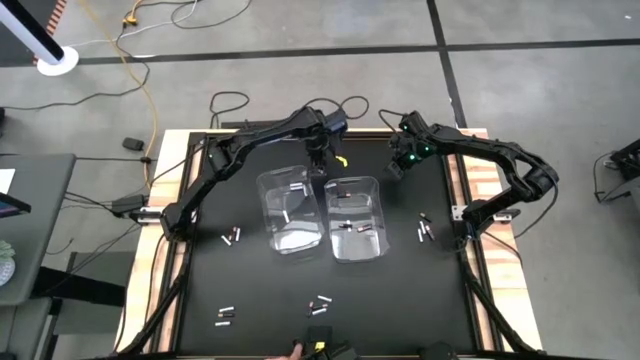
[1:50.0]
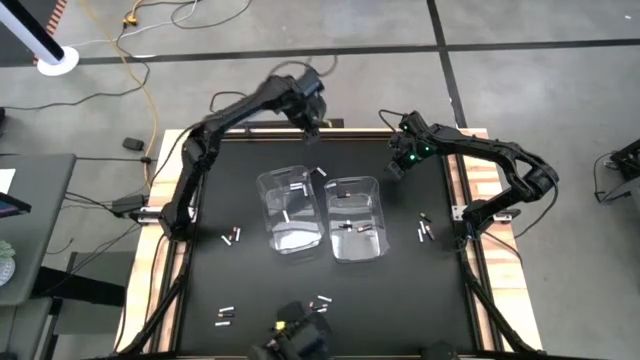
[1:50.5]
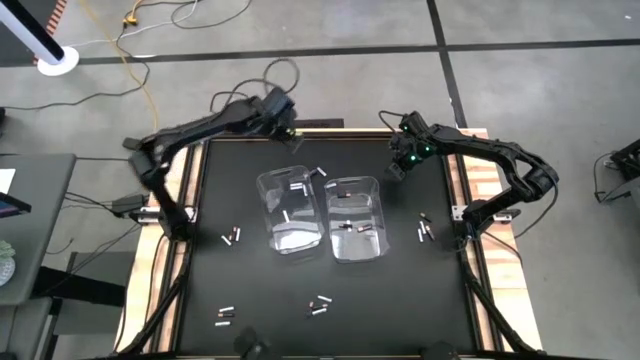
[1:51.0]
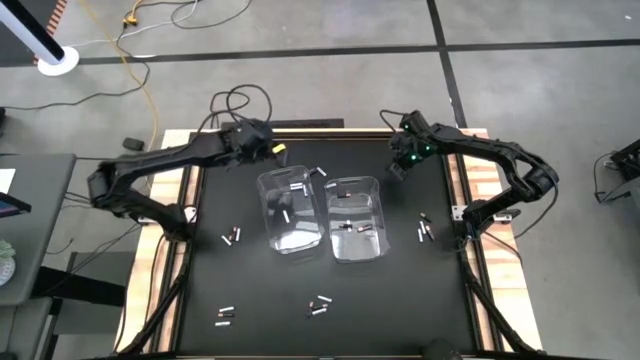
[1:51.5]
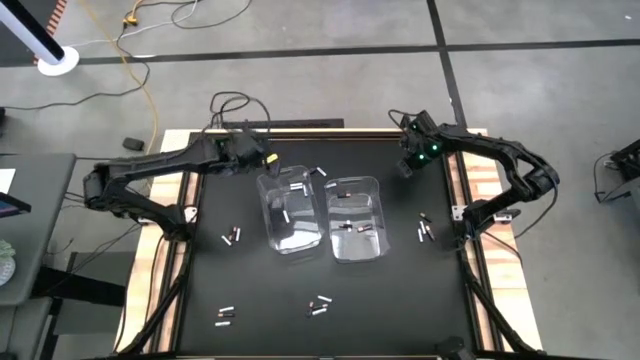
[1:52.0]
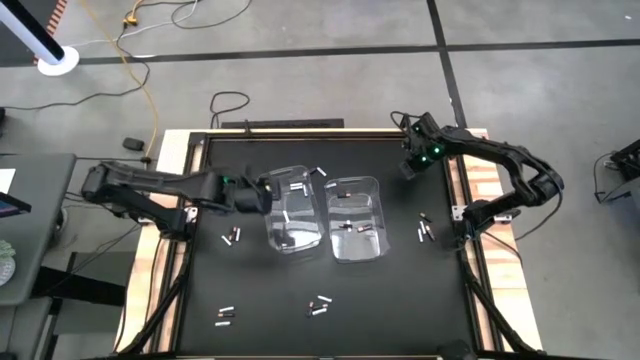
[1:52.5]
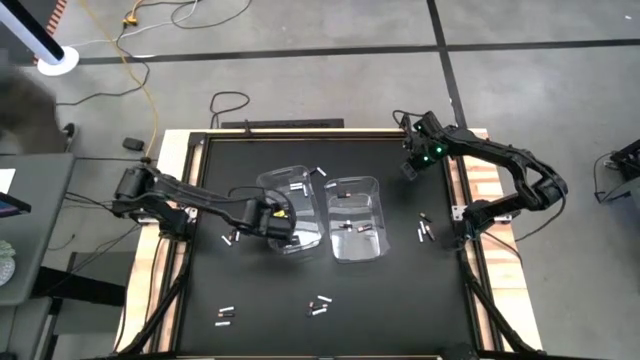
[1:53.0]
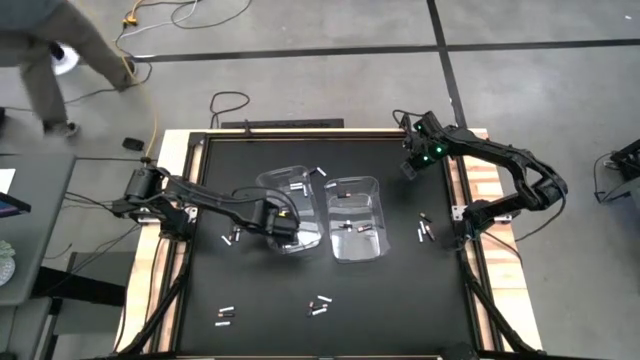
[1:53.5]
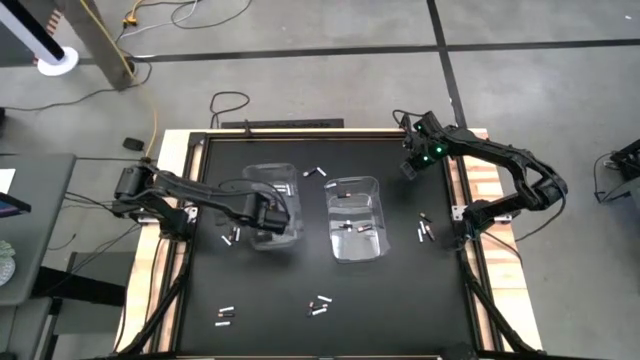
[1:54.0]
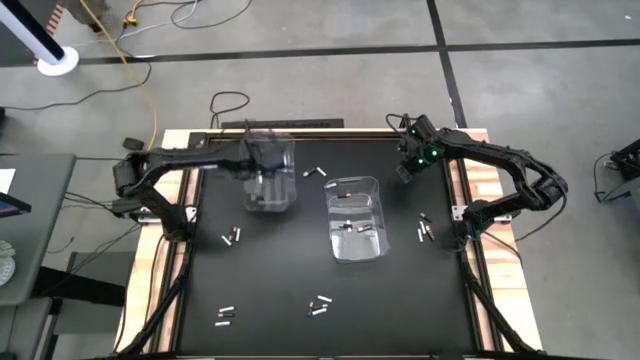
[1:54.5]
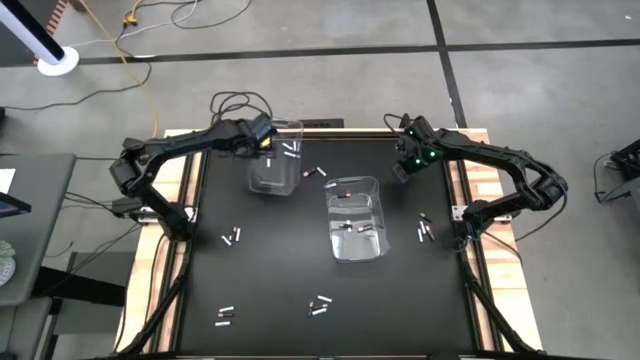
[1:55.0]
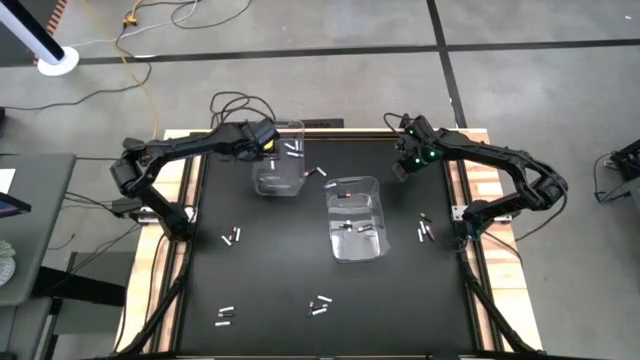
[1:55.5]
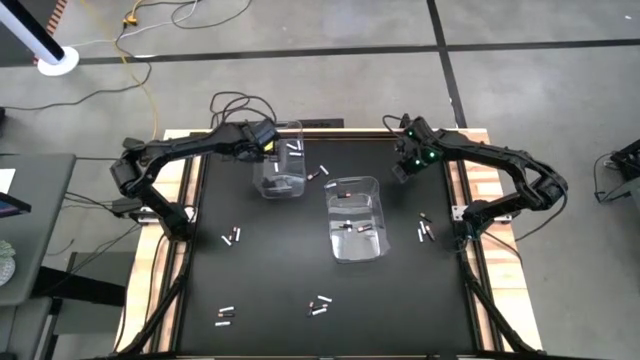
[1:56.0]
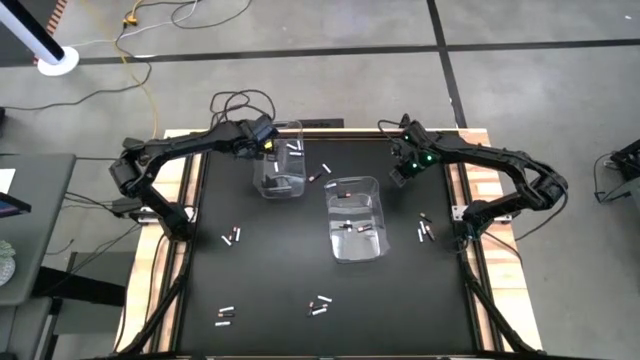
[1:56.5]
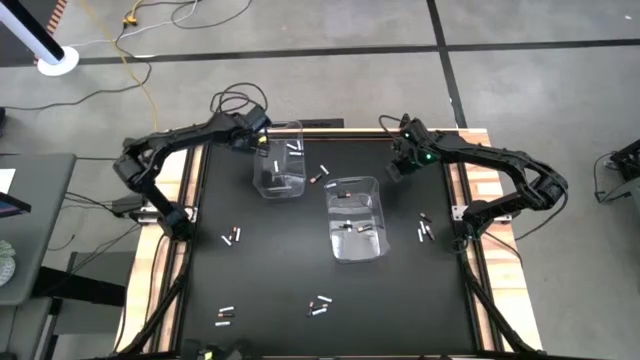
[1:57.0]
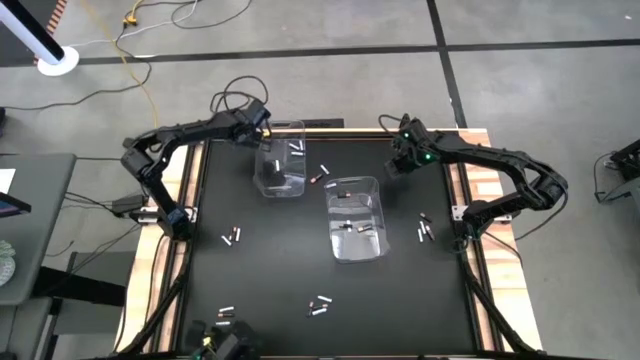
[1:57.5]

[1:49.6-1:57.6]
Task: Sort batteries
Move the left transparent bin to the top of the table

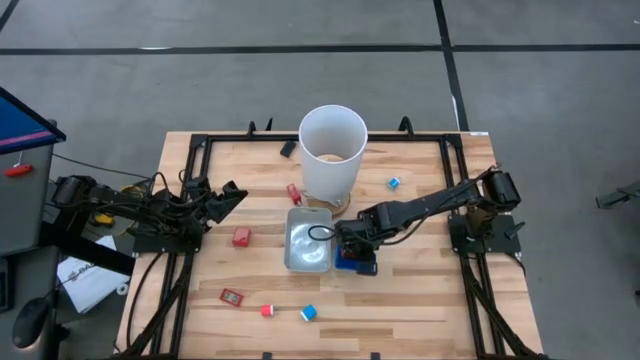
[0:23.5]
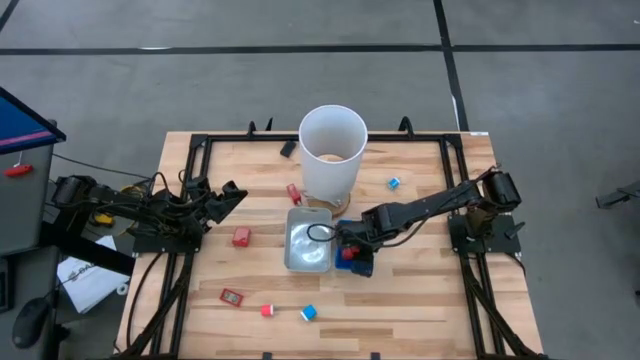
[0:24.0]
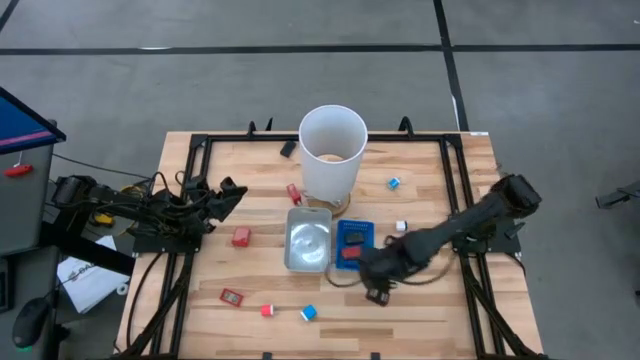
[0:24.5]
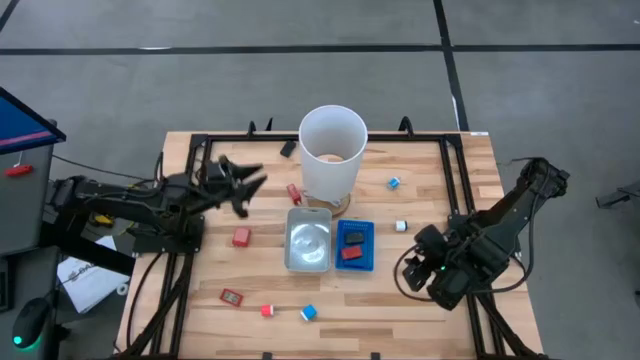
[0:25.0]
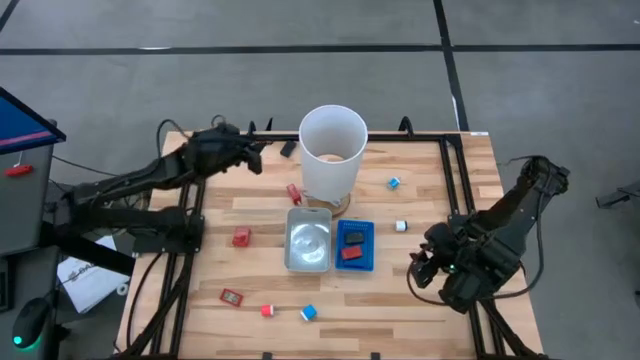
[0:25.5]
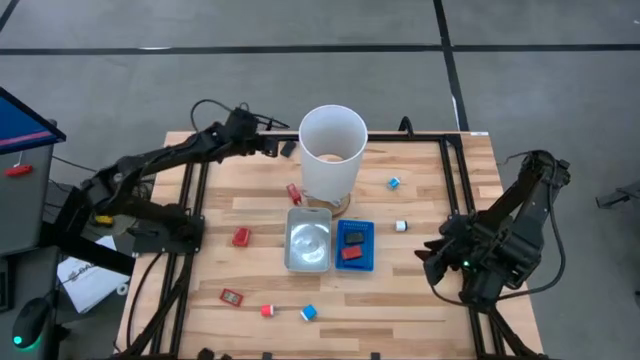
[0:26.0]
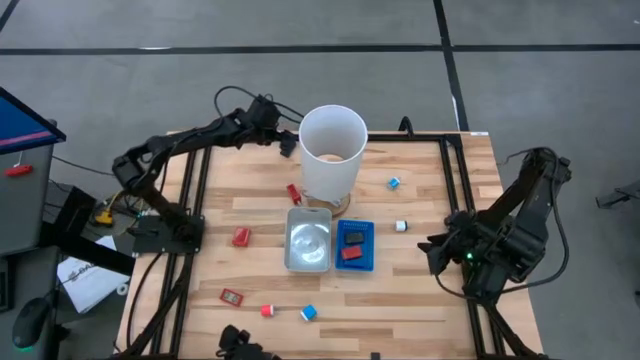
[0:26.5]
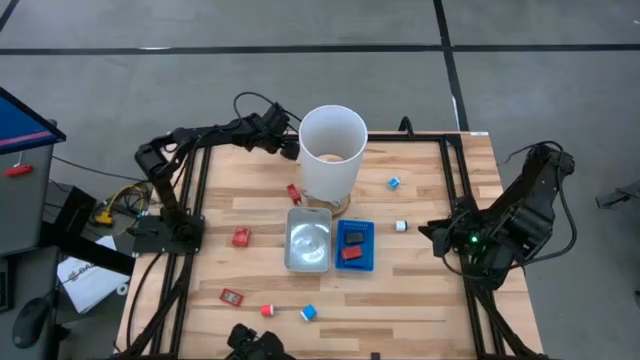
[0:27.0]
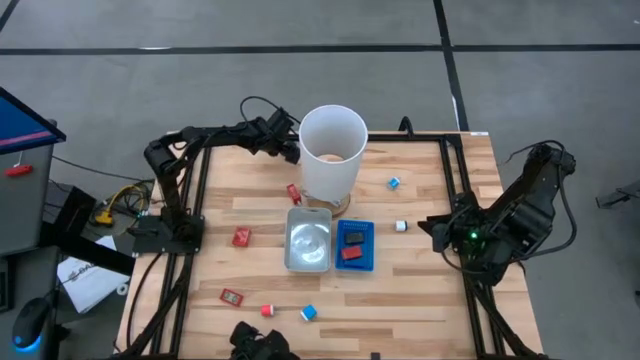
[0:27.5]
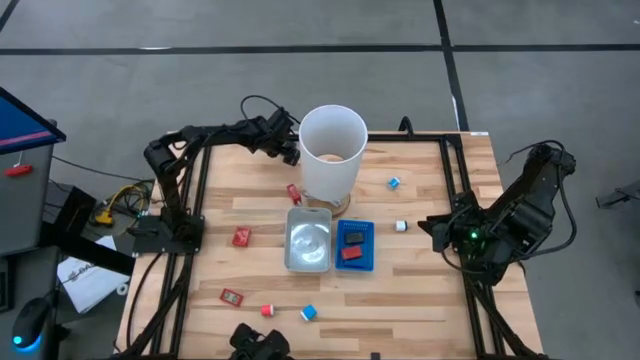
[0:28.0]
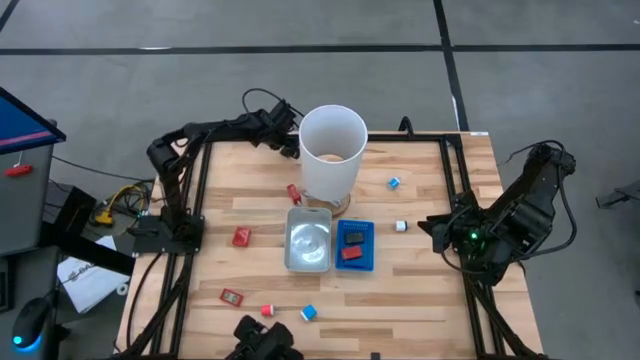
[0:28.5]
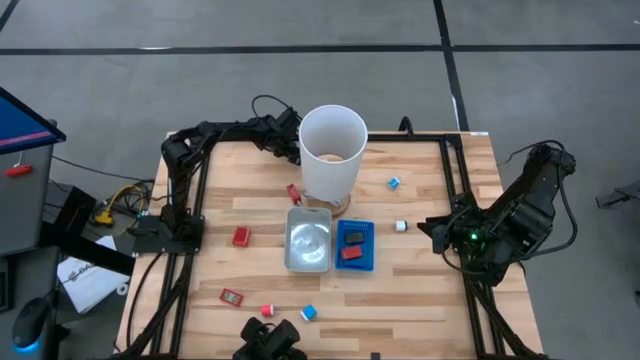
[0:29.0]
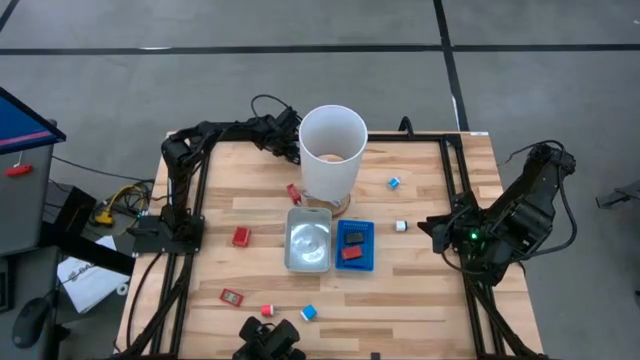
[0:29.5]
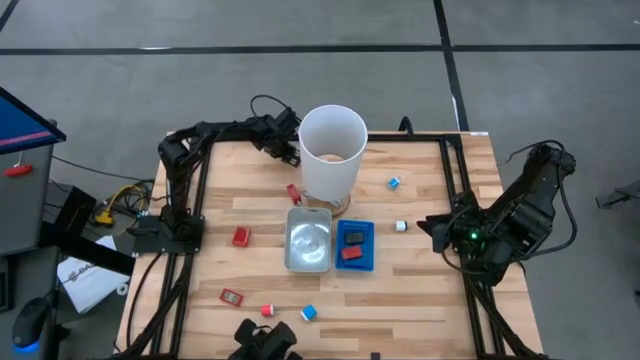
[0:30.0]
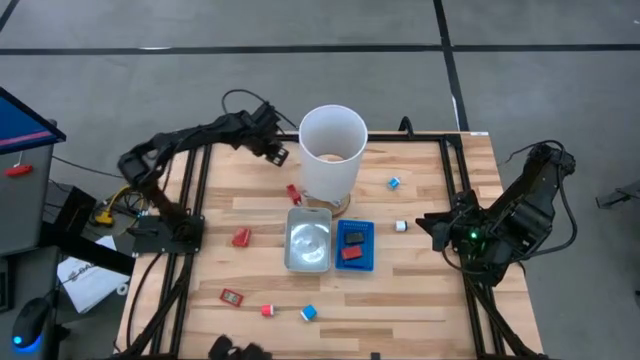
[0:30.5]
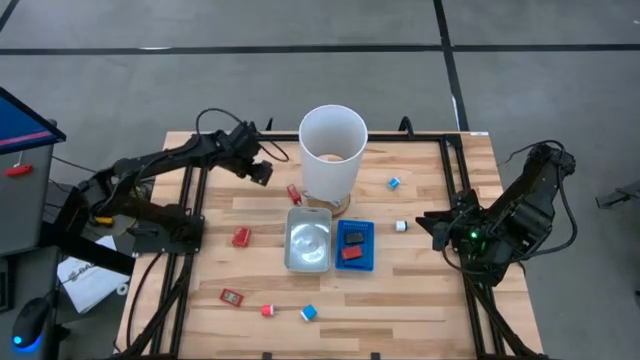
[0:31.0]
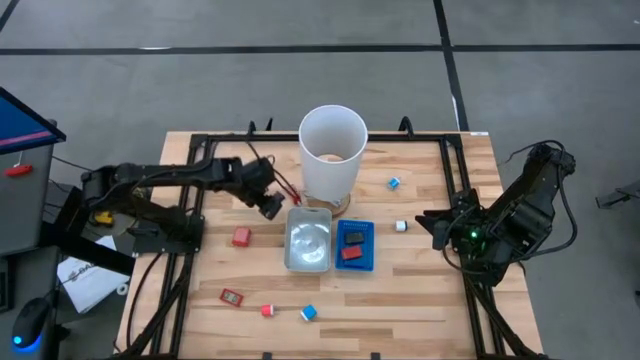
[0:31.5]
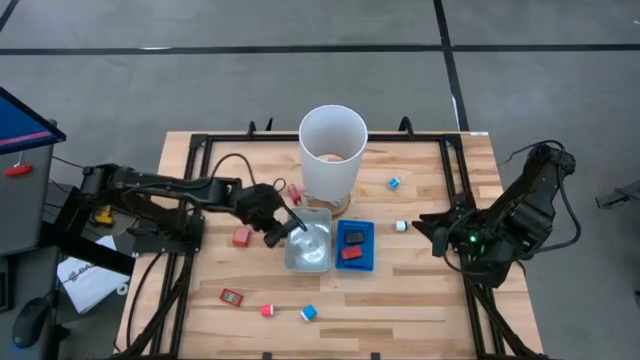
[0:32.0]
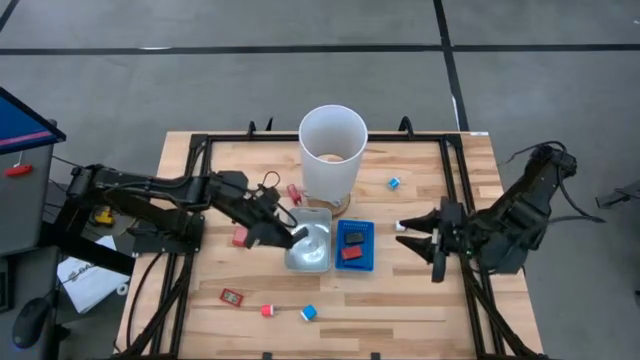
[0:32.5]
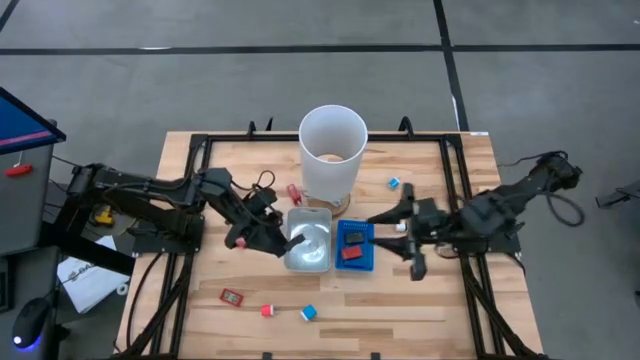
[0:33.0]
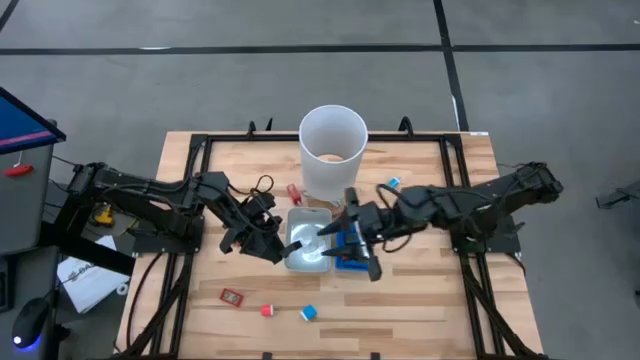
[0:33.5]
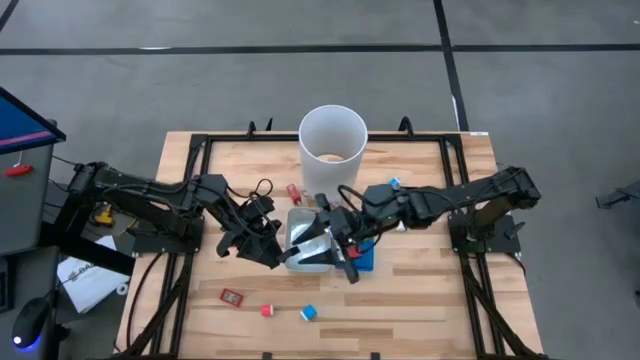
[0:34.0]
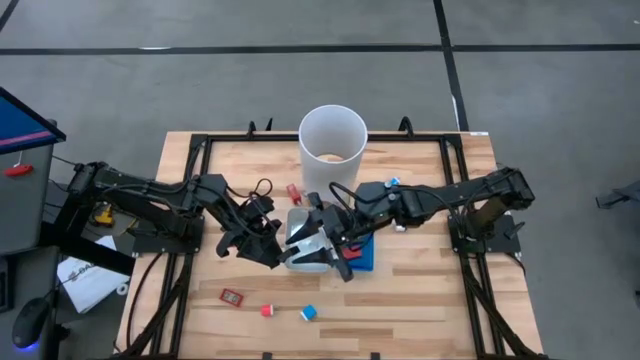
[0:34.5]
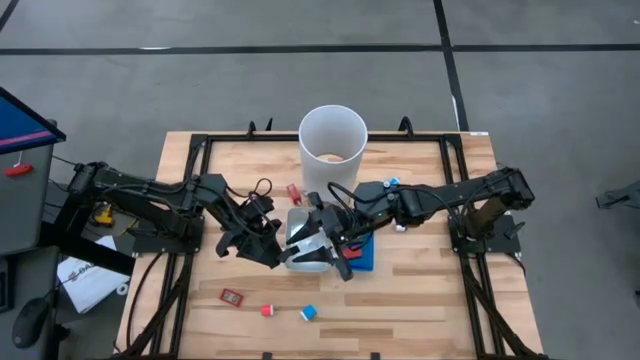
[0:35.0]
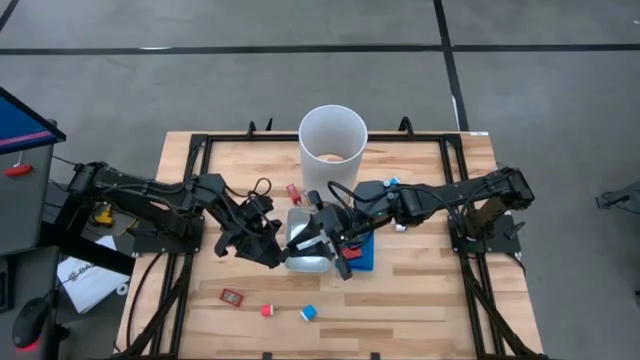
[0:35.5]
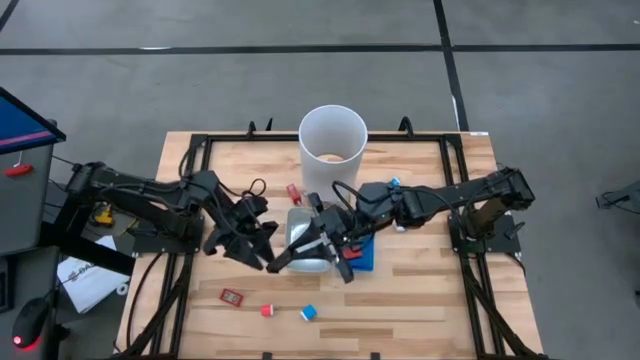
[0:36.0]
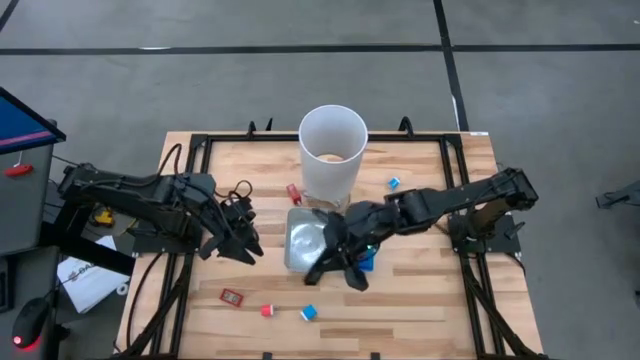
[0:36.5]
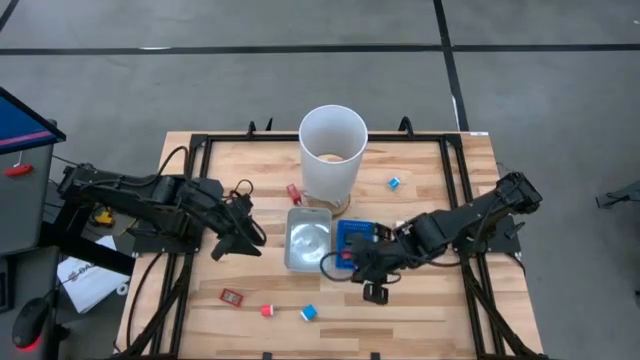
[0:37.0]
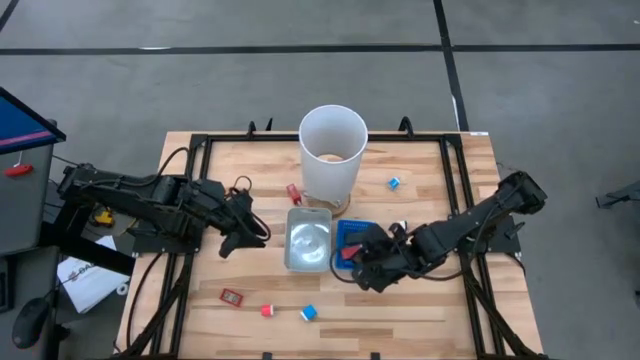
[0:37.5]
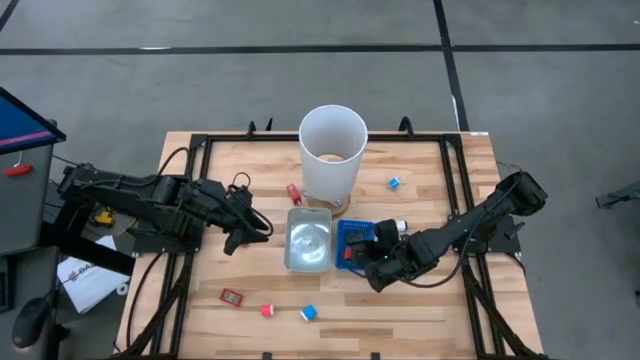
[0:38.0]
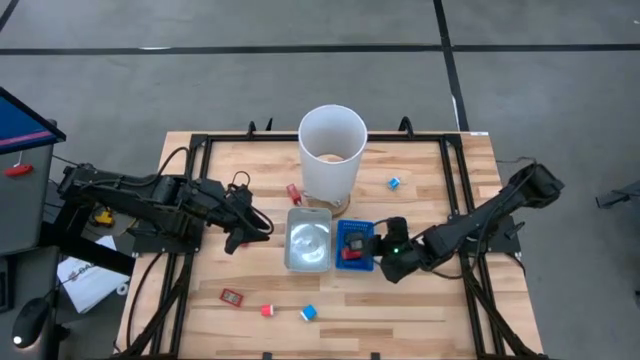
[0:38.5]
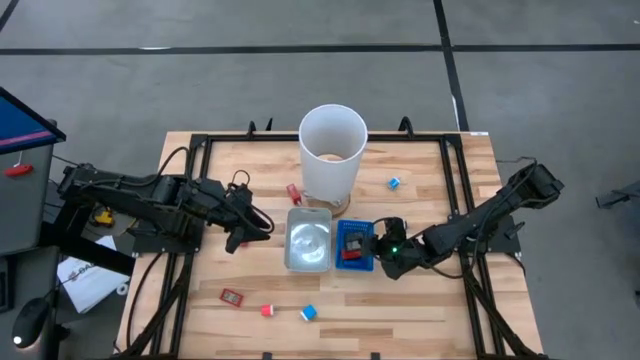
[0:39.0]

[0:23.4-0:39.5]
Task: Pick & Place Office items
Put the black digital clock into the blue bin
